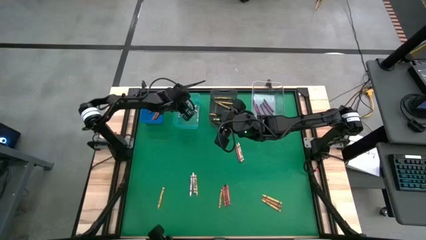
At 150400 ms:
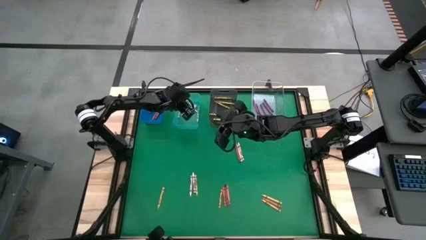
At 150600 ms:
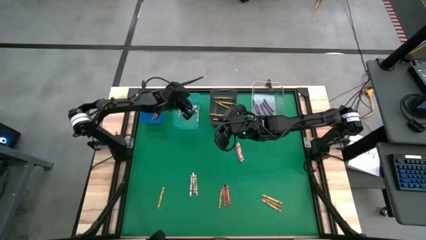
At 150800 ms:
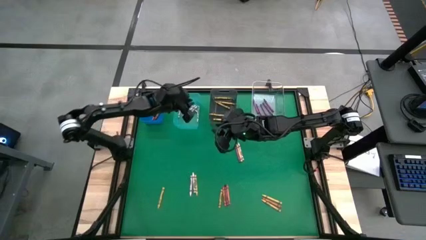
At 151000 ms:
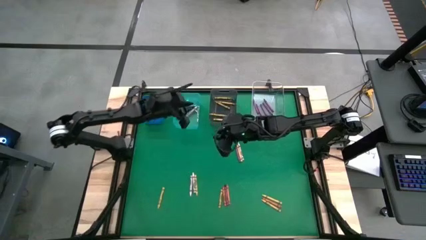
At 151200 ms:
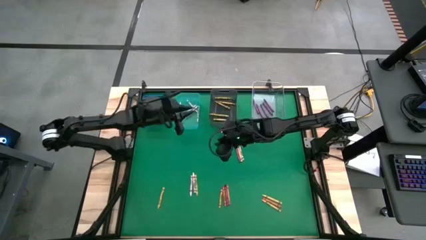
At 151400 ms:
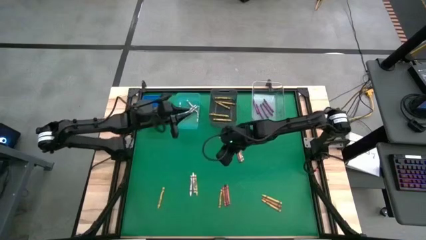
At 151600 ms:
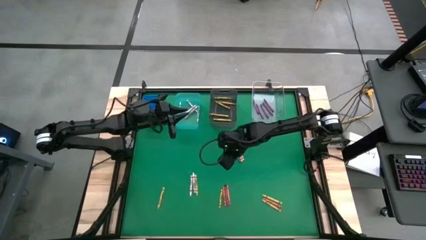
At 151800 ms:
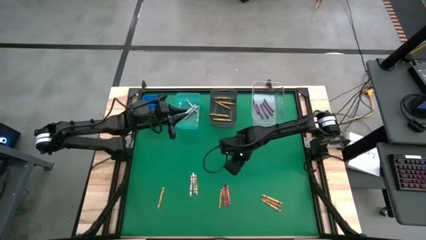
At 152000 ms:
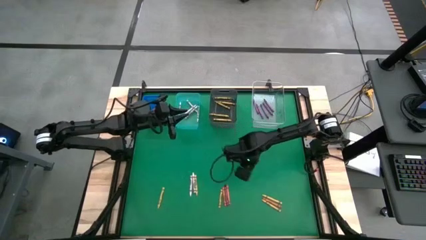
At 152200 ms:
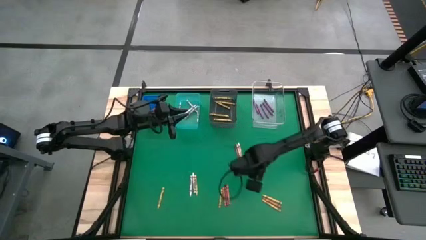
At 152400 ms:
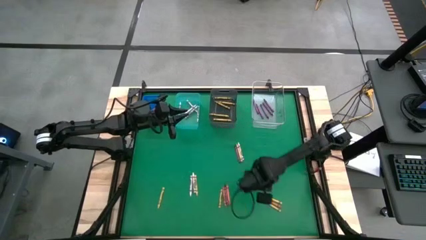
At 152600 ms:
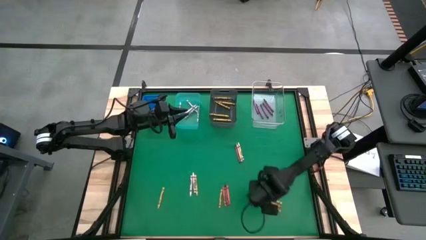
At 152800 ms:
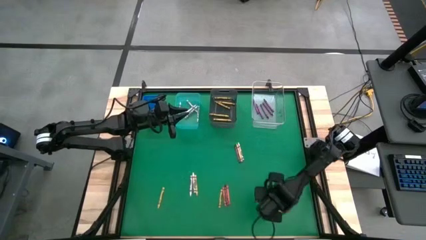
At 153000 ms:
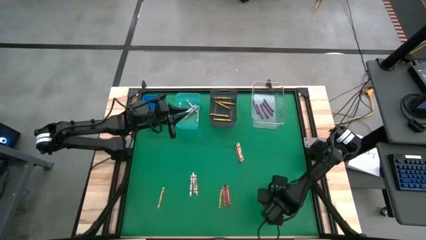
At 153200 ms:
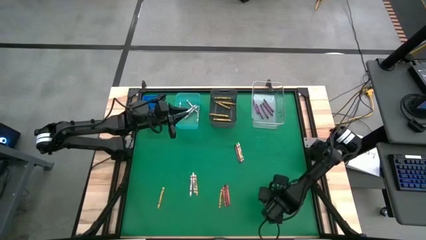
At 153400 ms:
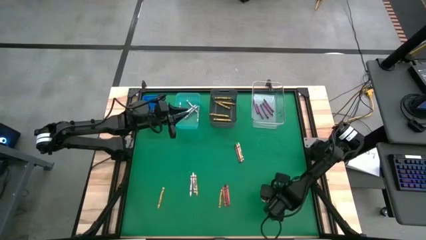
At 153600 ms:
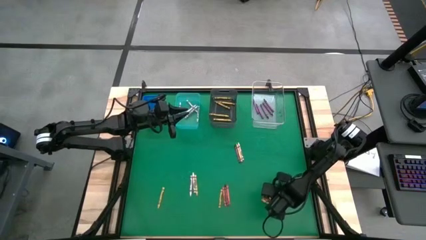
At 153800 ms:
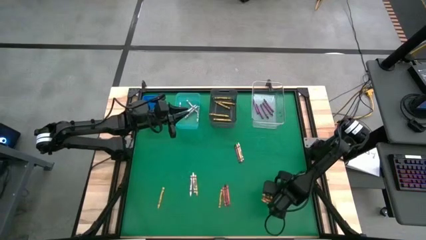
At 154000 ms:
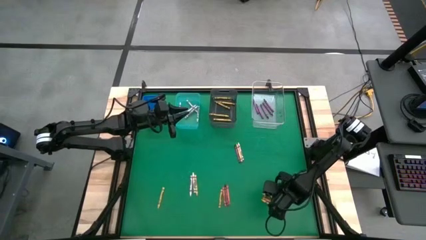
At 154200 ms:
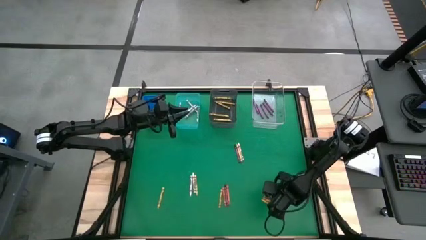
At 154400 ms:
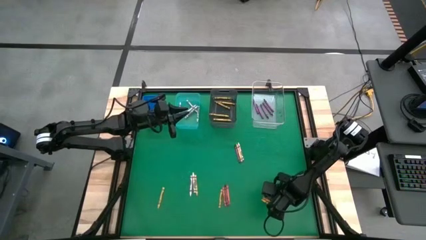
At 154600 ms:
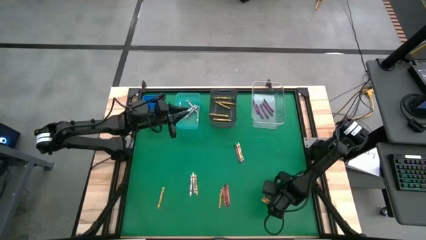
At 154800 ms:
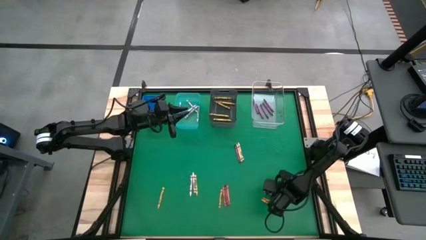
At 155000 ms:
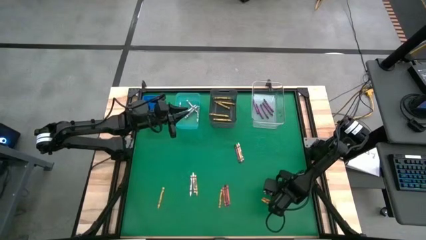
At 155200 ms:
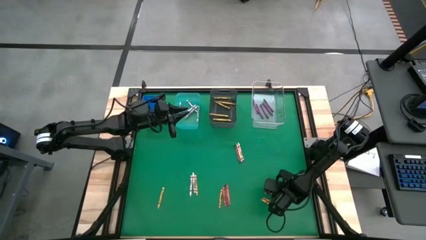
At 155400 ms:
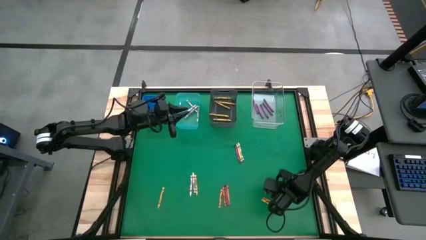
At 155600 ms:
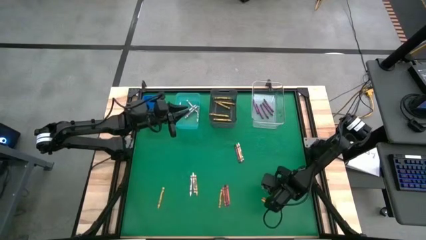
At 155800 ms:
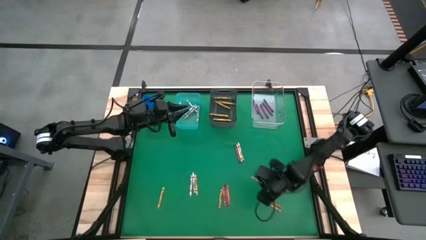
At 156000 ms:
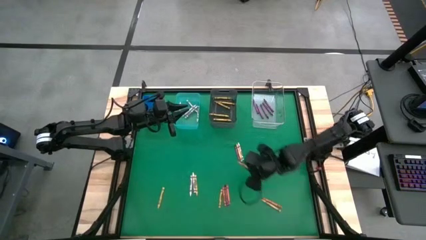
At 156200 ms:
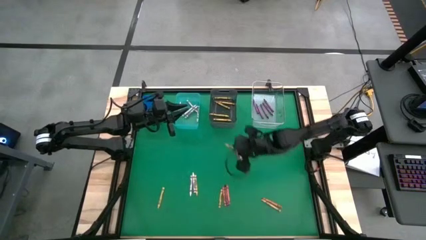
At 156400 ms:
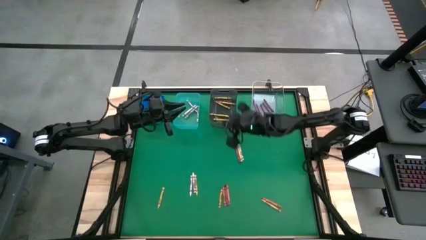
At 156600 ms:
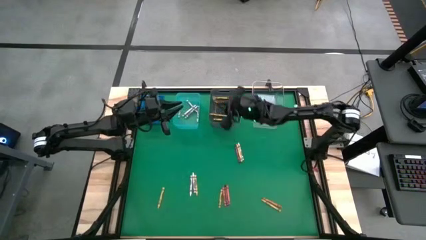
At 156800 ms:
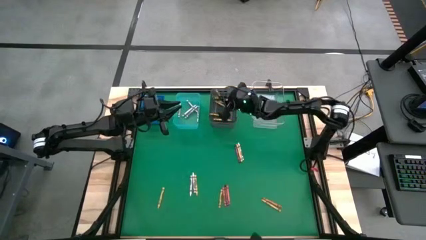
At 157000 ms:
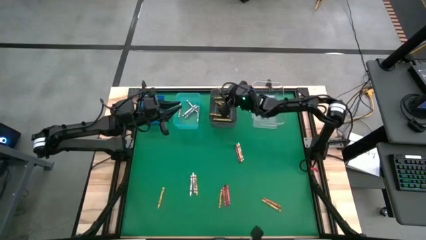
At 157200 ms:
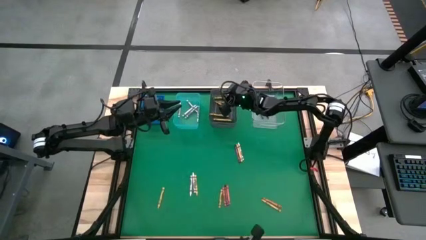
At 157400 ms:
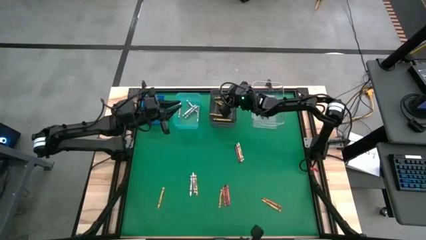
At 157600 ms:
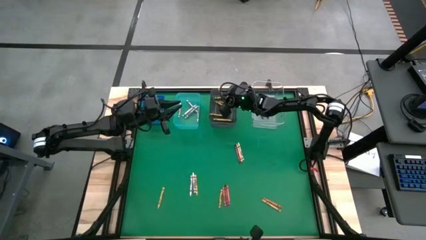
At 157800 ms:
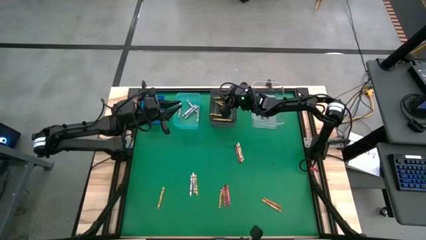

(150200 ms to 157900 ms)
Task: Sort crayons
Put the yellow crayon into the black bin

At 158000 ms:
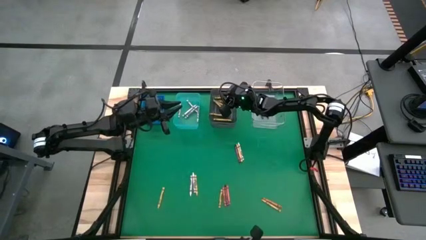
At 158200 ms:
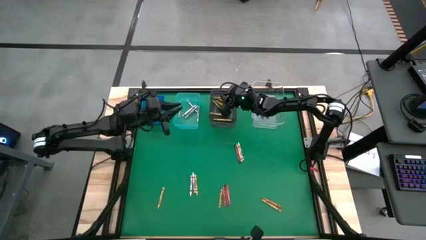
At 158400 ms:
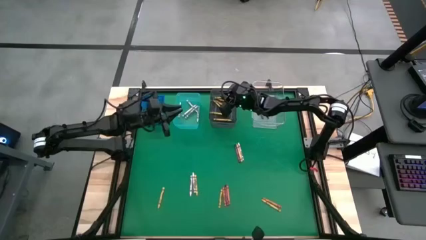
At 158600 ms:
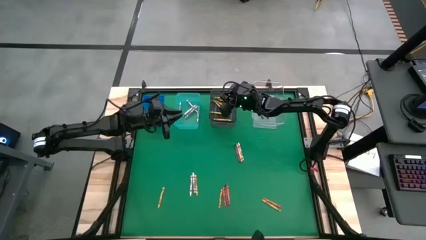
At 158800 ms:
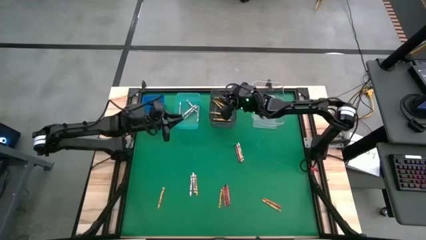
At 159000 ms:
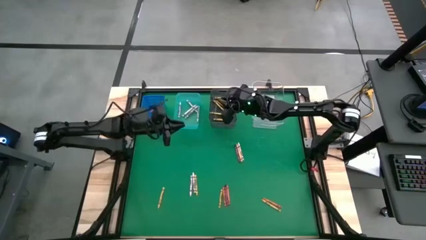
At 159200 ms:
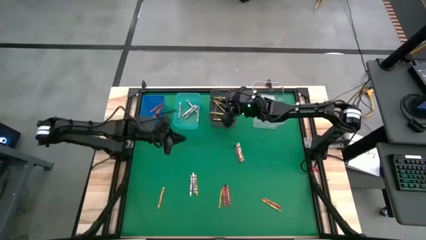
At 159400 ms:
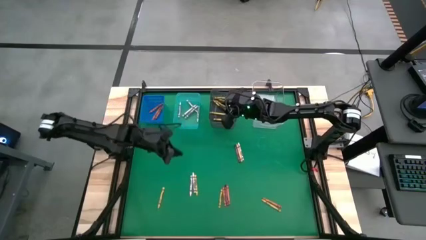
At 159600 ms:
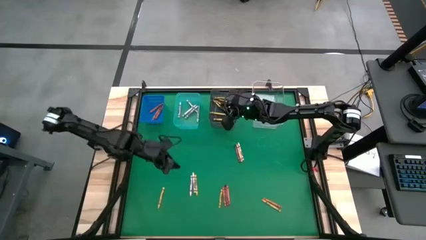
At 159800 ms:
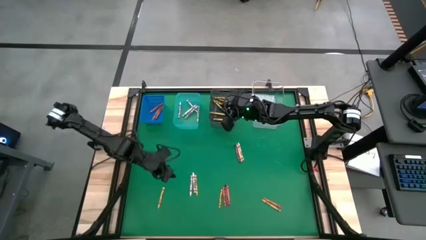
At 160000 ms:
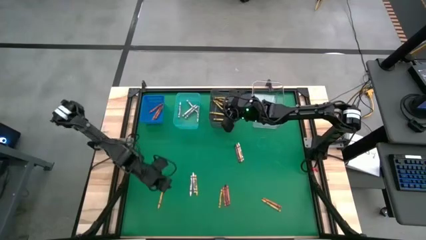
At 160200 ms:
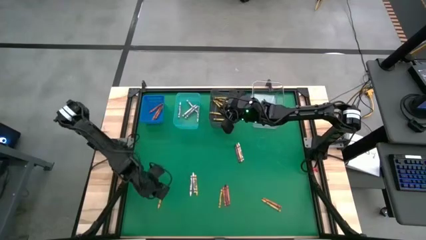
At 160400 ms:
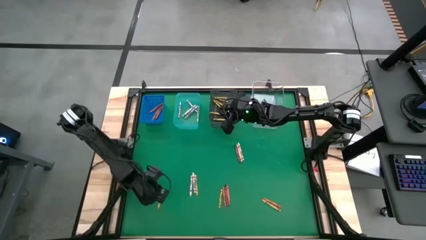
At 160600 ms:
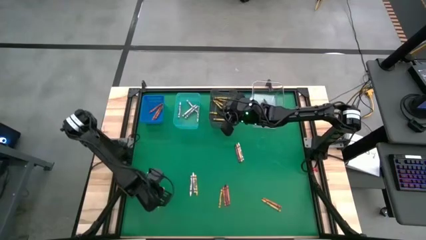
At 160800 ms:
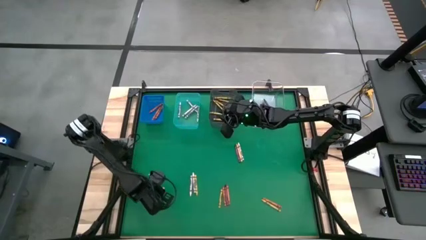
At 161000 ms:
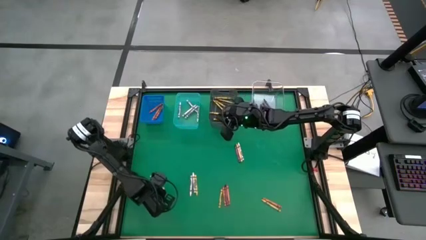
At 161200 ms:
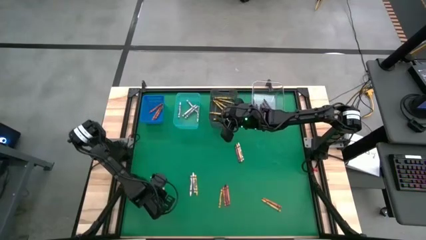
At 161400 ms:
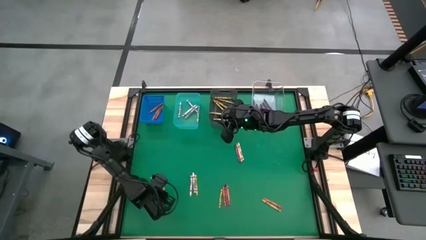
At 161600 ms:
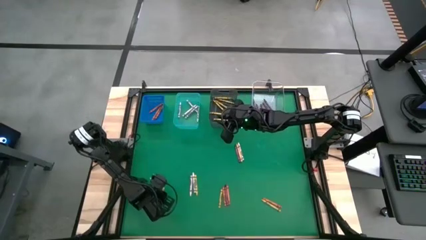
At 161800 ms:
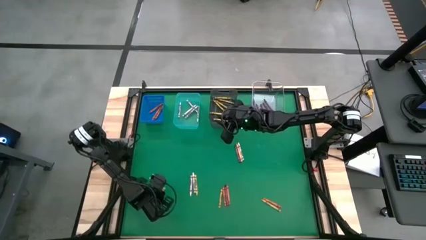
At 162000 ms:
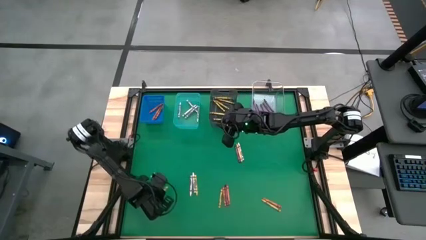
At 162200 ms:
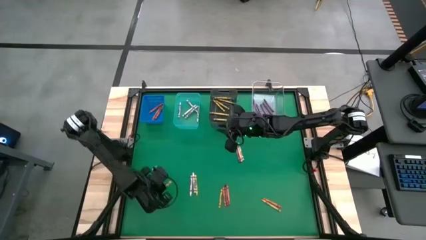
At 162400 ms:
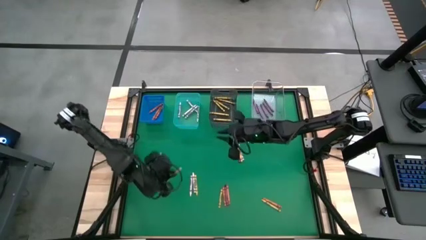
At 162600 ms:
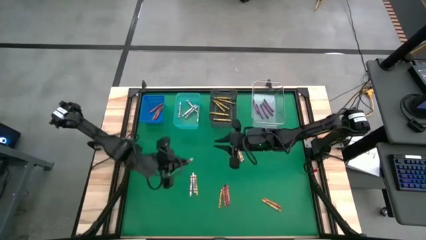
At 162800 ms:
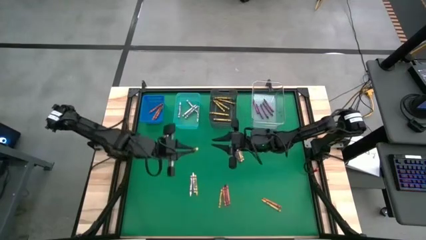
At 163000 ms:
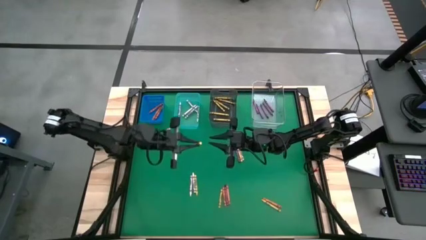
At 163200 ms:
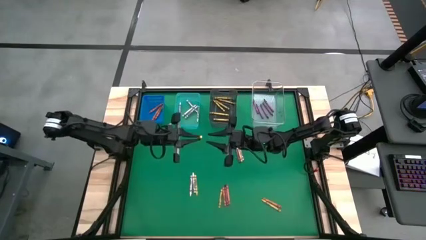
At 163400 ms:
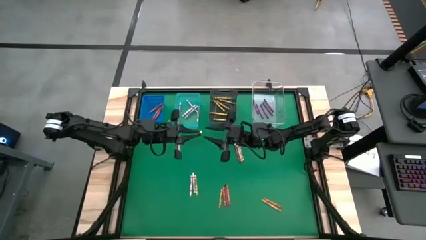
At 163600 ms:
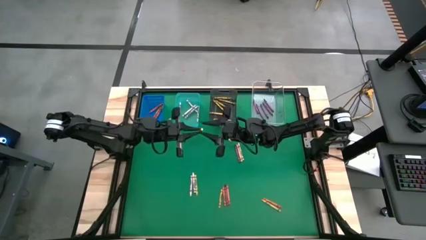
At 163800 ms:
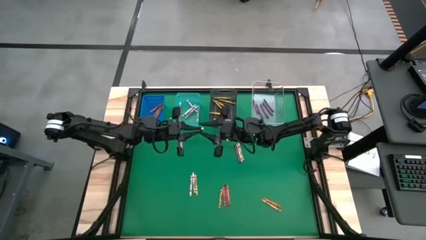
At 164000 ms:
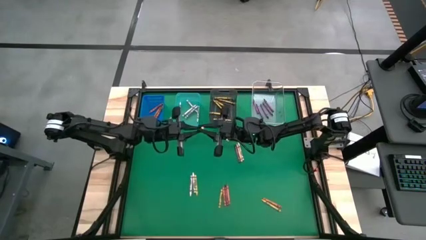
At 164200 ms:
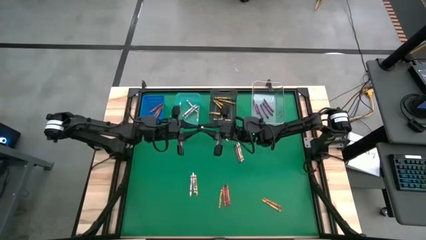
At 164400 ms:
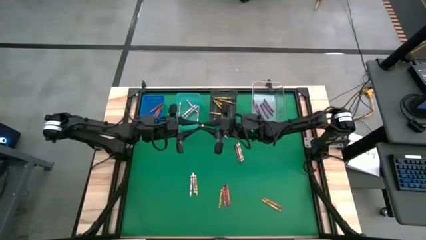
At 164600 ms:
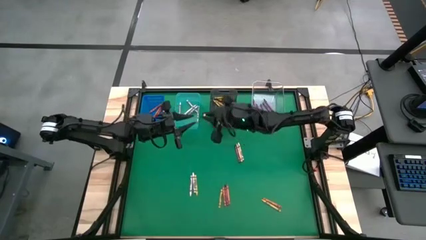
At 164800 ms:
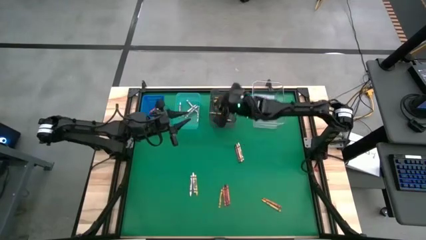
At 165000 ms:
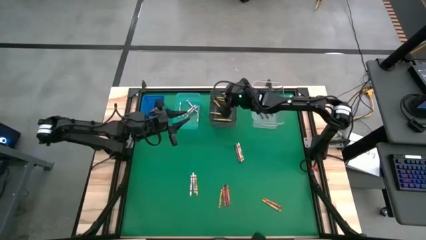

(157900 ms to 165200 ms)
Put the yellow crayon into the black bin
